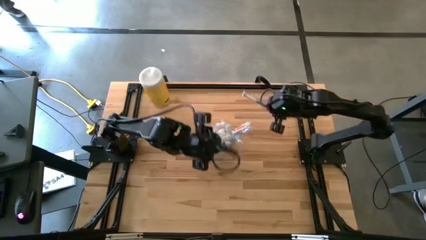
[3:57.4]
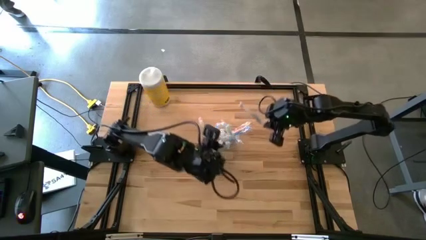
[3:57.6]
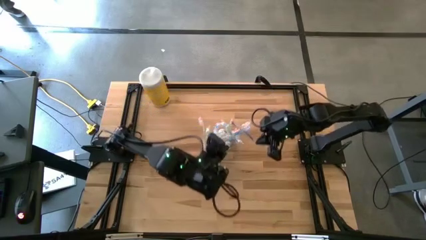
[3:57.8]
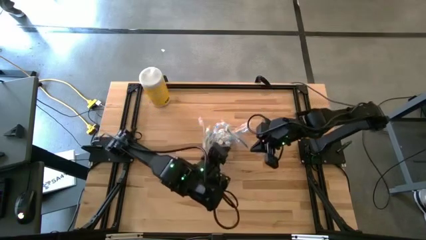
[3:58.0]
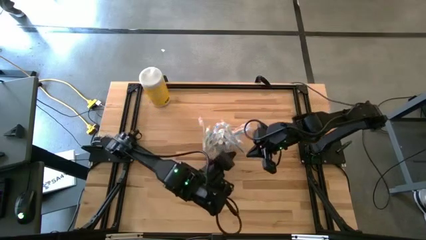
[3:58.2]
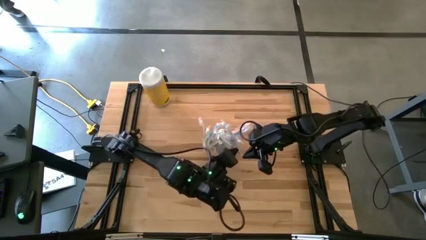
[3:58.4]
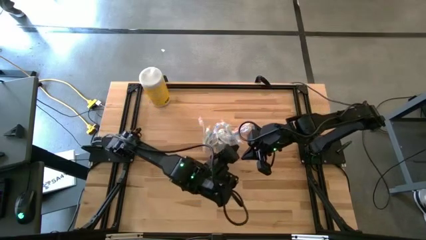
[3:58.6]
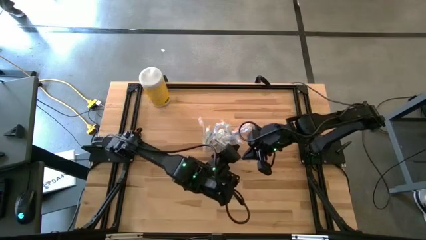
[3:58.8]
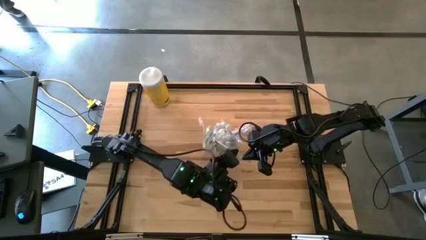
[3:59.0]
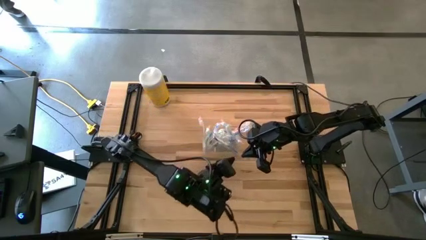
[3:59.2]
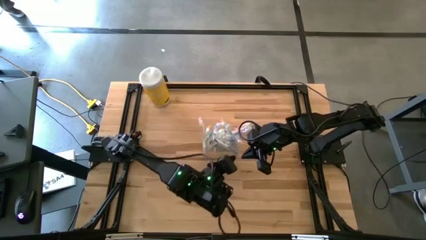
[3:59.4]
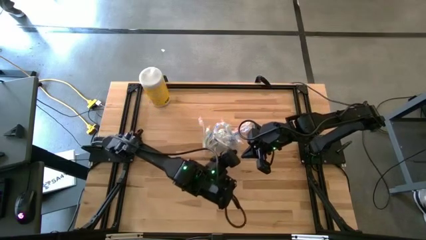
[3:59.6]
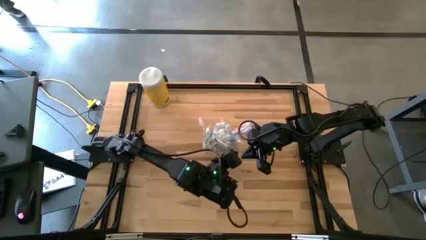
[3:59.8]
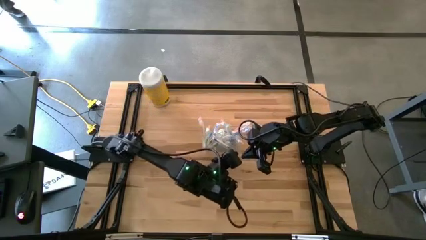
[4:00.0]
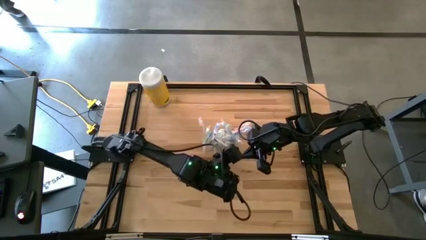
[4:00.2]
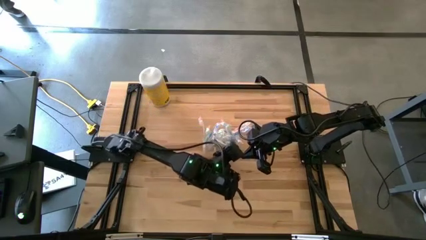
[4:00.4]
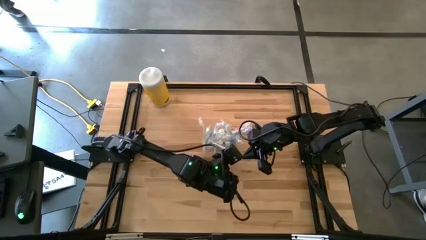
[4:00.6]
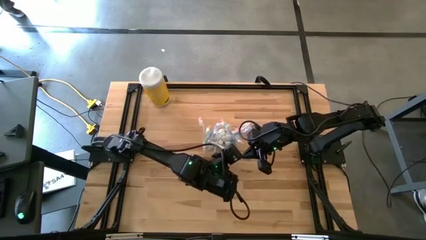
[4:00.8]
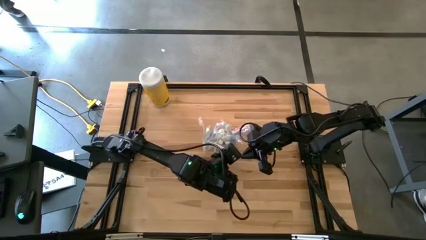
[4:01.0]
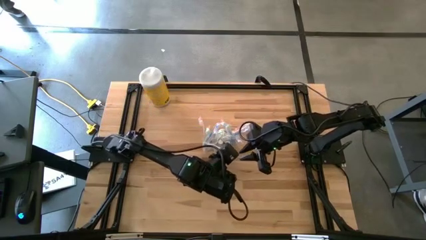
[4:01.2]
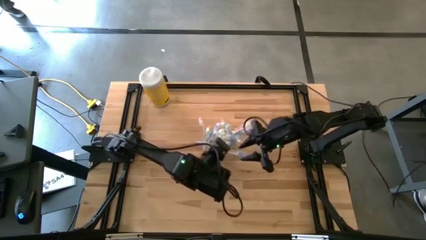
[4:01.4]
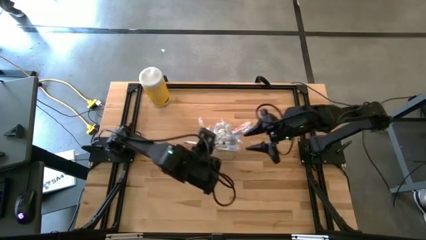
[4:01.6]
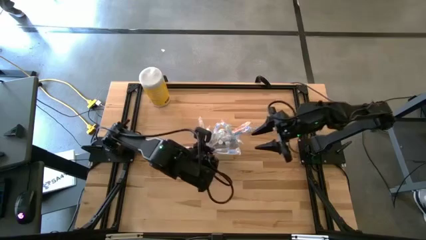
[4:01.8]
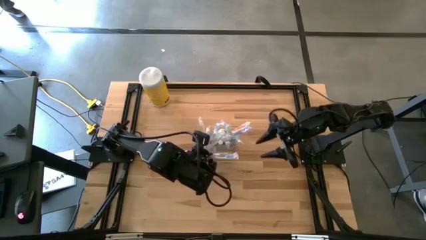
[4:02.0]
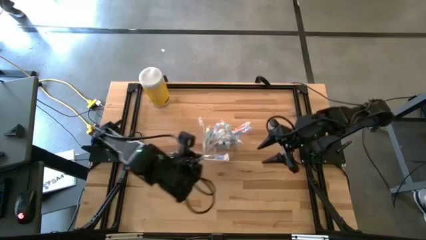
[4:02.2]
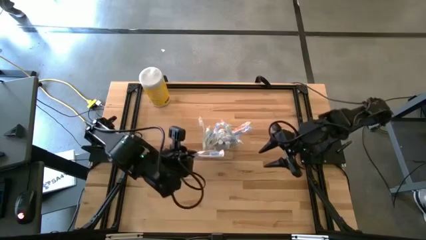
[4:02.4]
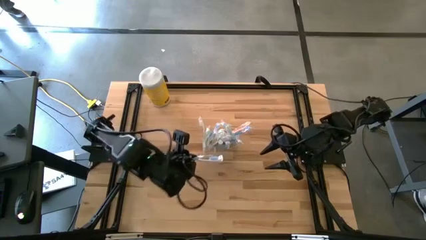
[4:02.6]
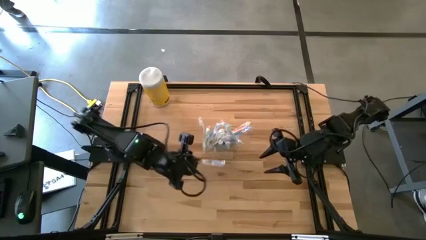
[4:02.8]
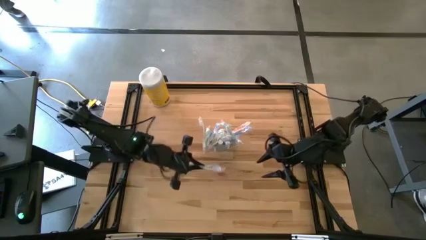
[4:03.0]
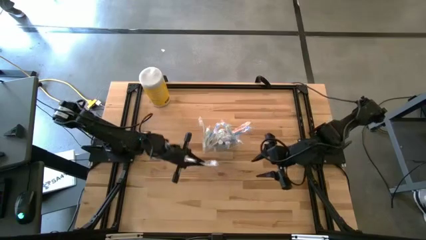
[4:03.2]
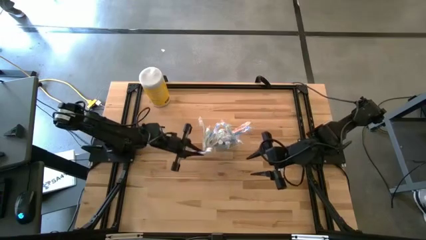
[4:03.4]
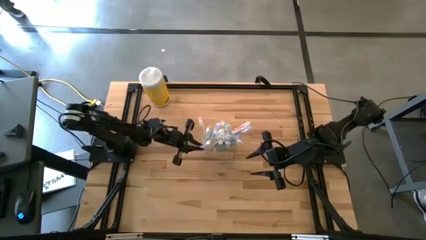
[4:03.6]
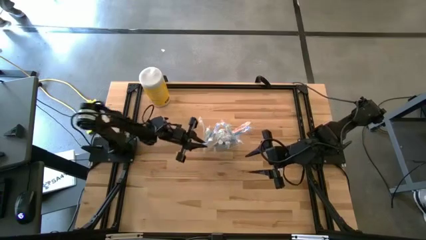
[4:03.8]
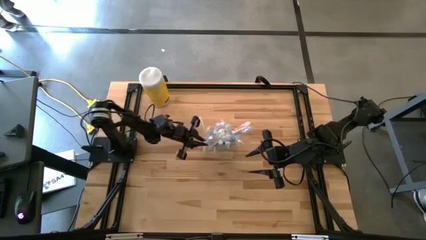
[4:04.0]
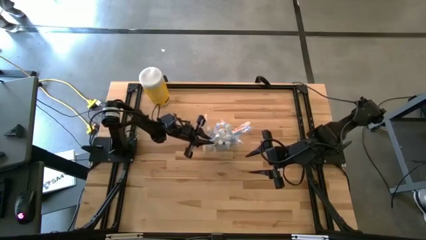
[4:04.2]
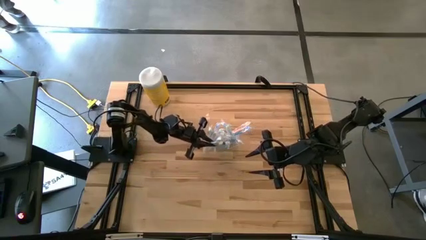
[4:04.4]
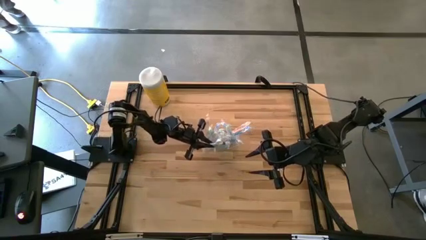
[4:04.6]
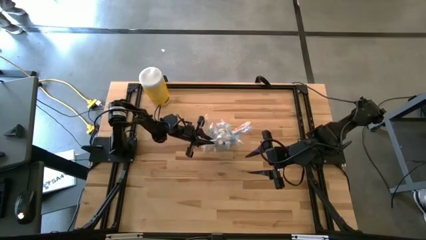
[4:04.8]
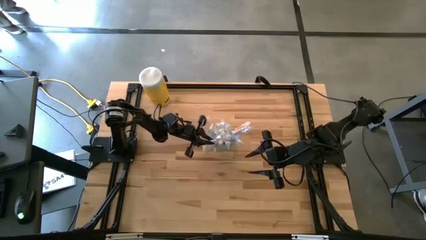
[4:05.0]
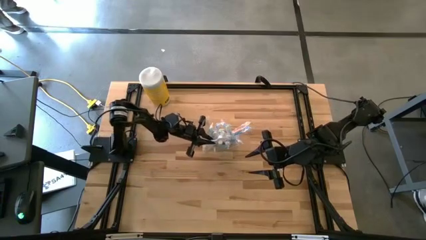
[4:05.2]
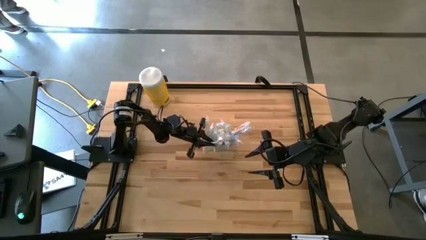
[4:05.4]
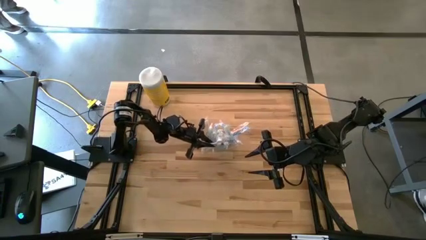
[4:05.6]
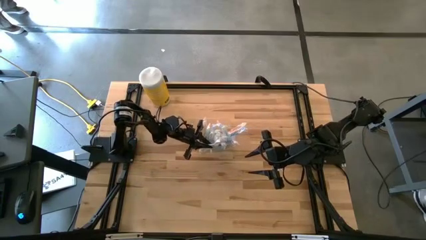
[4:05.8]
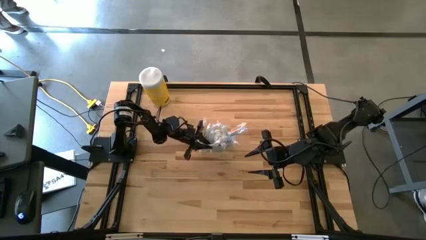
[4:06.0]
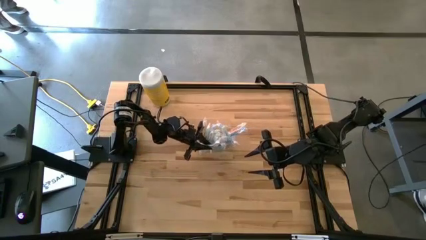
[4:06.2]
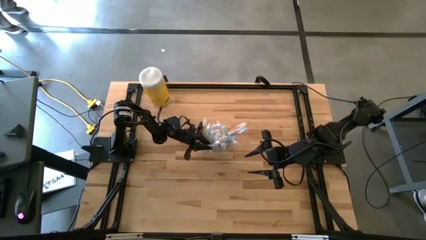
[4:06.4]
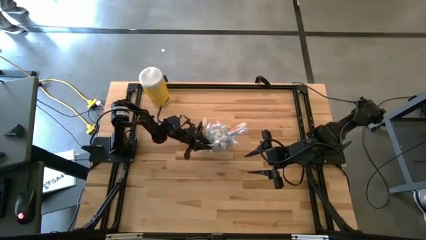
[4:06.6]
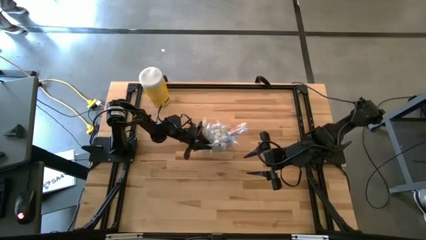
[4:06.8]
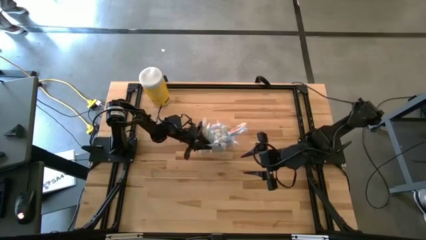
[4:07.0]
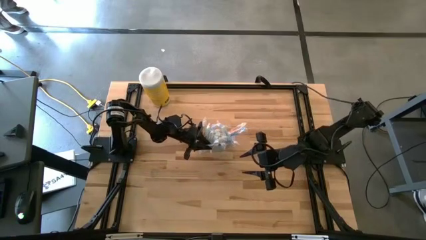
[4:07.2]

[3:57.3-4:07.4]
Task: Pick & Place toothbrushing station
Put the blue toothbrush into the transparent organizer

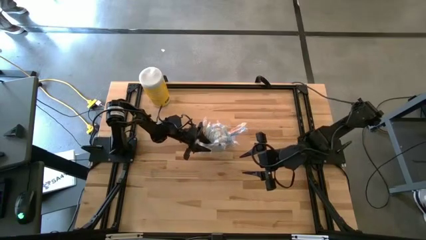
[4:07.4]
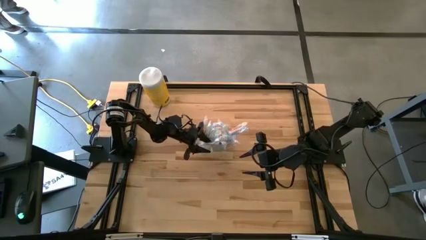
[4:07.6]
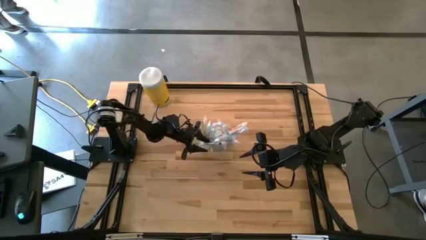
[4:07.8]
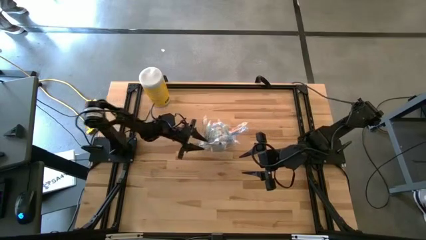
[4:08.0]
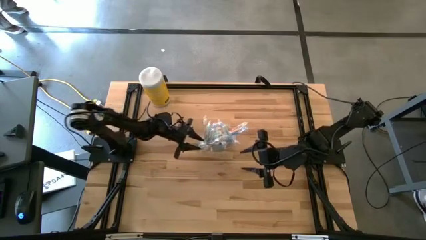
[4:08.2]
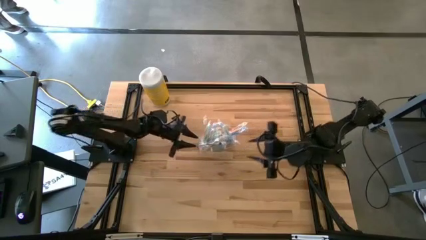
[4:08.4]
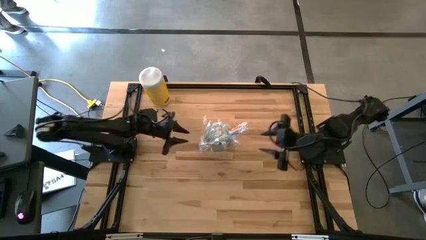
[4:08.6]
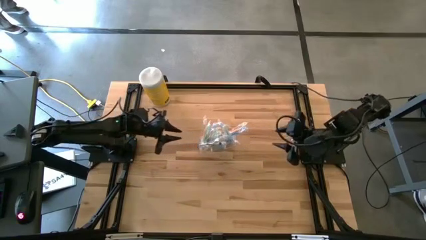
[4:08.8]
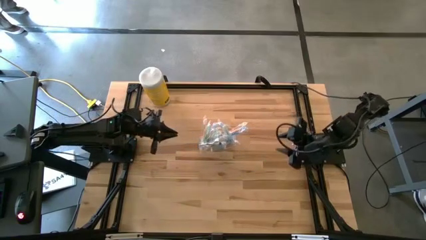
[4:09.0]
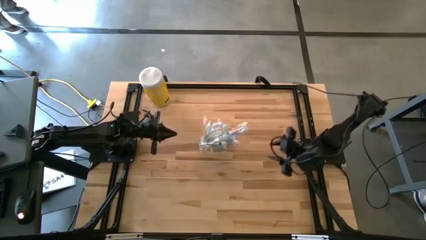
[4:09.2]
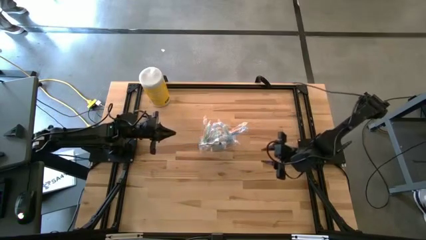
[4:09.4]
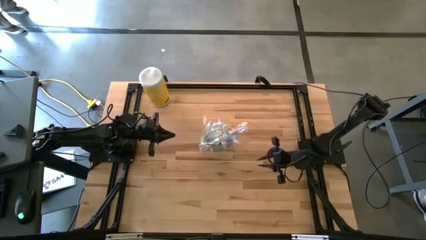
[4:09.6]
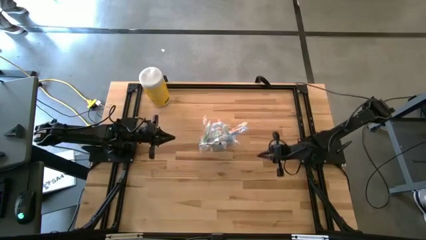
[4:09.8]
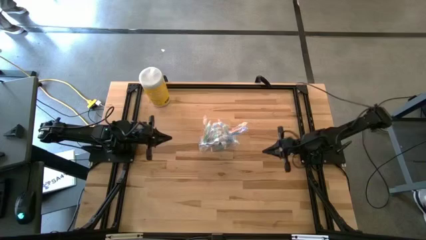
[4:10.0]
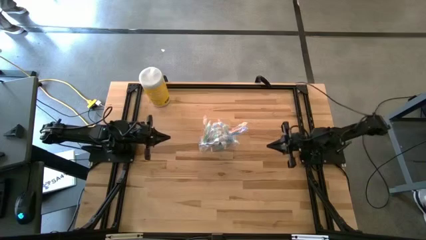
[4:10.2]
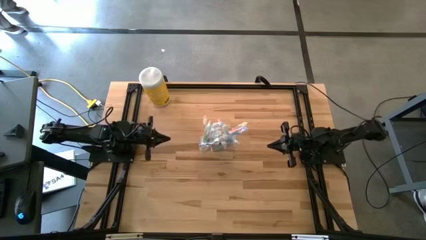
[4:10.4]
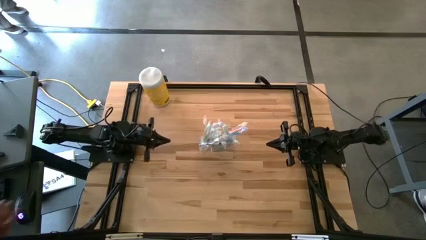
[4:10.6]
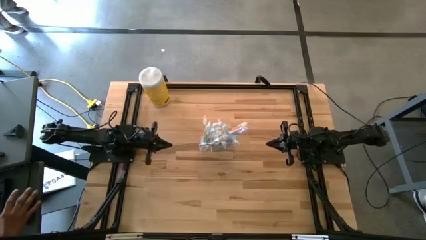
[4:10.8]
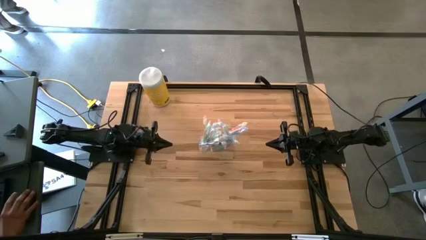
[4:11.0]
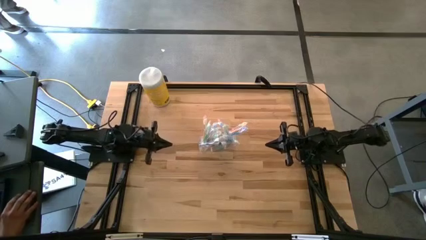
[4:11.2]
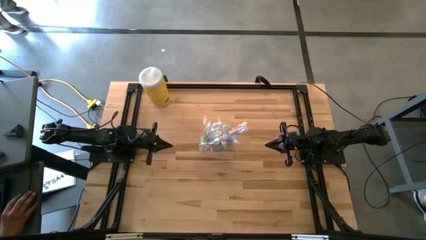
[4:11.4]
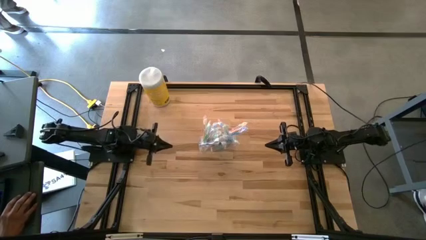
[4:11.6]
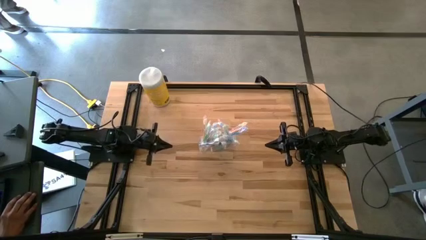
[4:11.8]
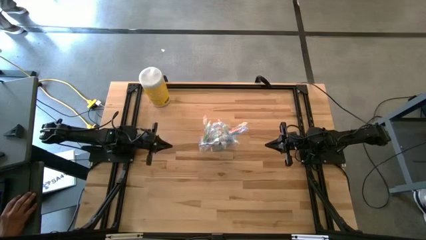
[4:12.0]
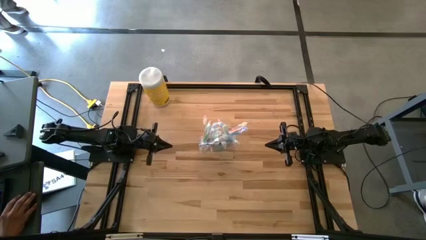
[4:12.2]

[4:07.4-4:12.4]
Return to Home Position

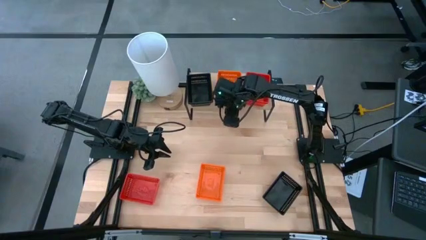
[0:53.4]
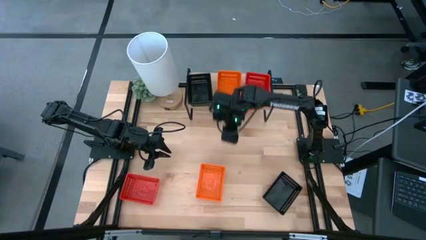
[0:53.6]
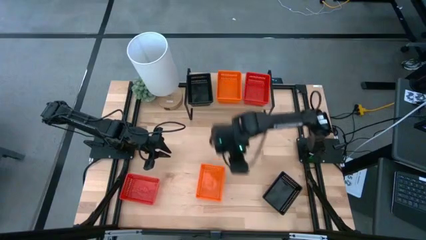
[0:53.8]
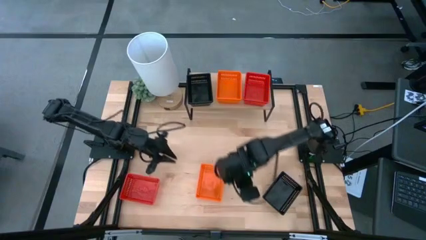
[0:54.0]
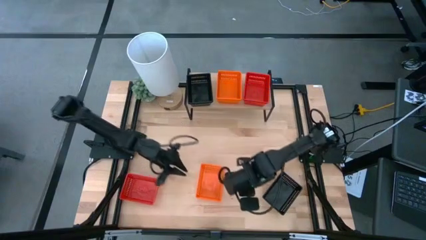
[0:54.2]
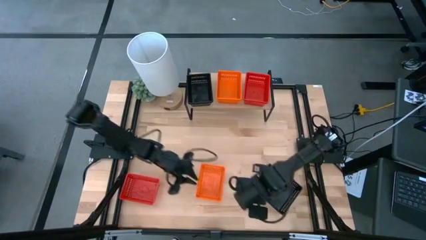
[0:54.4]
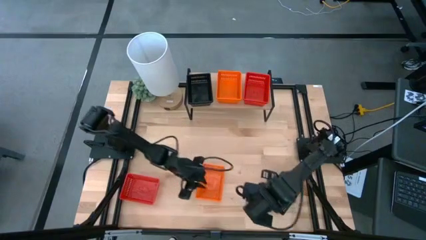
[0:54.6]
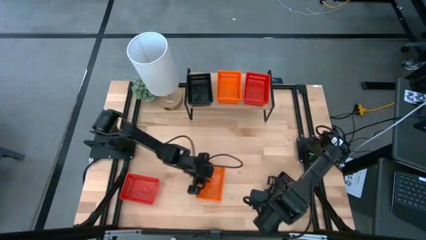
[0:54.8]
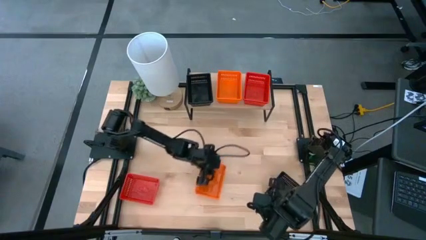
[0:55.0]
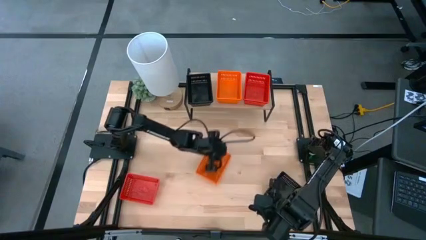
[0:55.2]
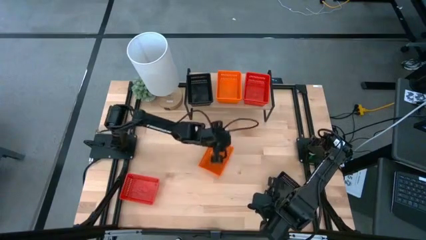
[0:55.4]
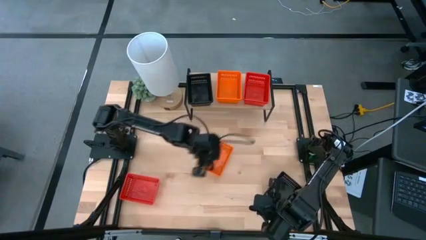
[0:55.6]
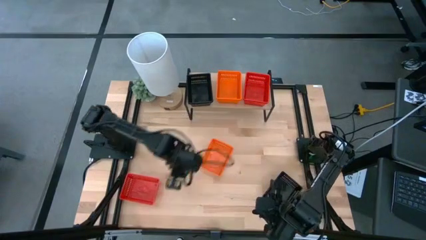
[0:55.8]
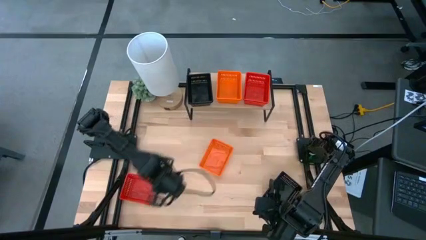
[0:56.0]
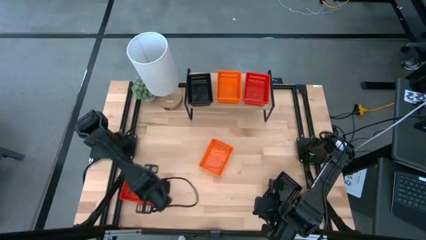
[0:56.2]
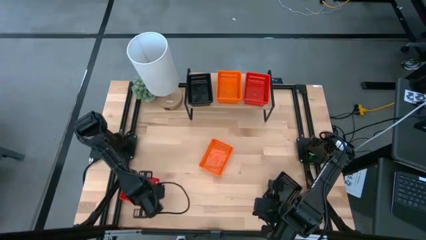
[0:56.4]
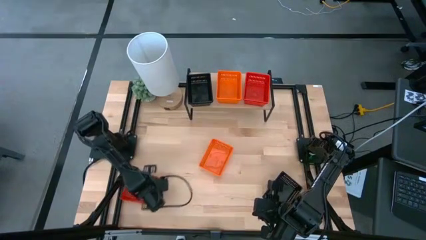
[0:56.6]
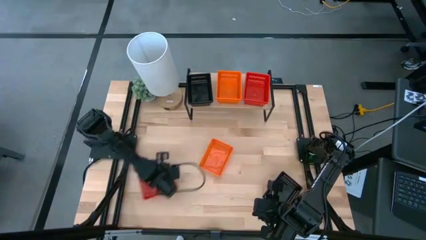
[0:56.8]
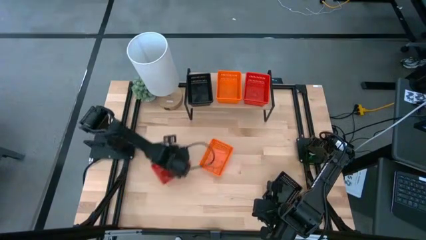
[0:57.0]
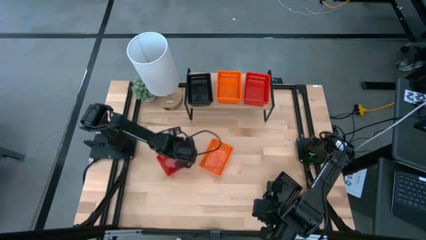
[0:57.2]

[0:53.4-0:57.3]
Task: Stack baskets on shelf by color
Move the oranges and red bins to the center of the table
